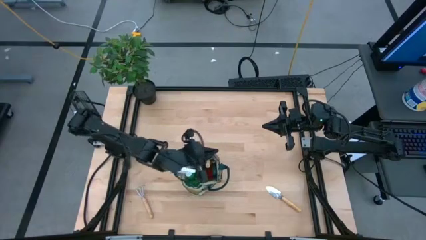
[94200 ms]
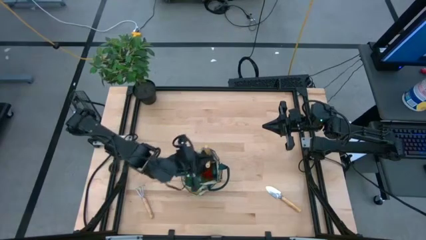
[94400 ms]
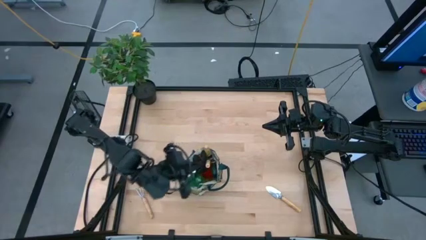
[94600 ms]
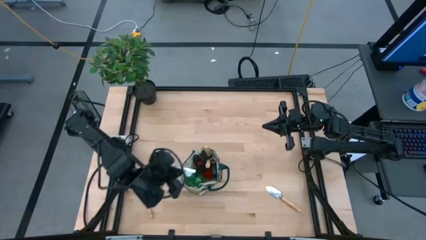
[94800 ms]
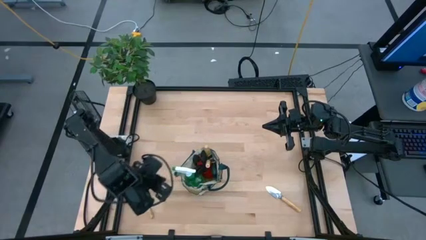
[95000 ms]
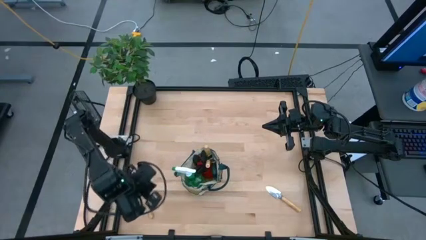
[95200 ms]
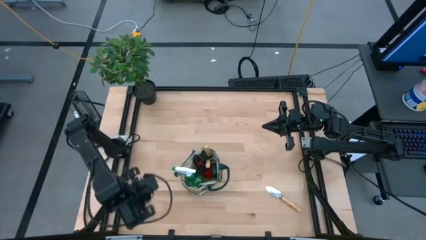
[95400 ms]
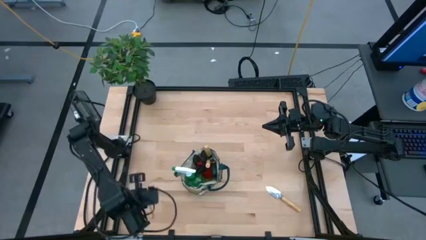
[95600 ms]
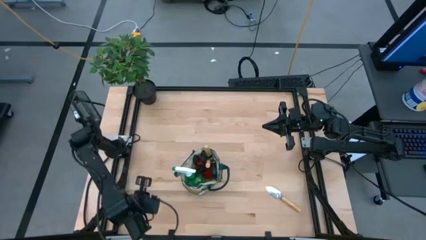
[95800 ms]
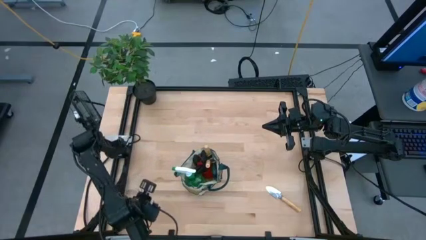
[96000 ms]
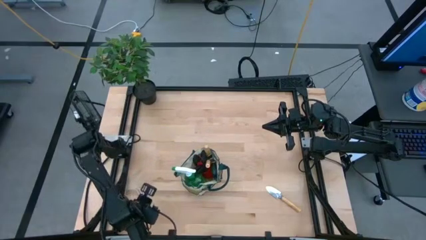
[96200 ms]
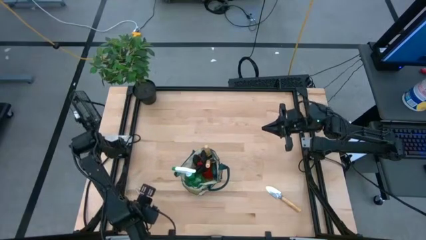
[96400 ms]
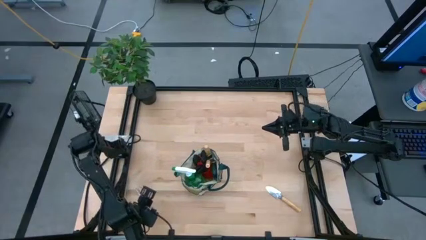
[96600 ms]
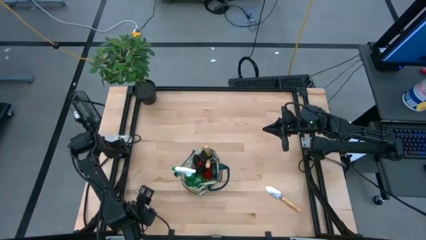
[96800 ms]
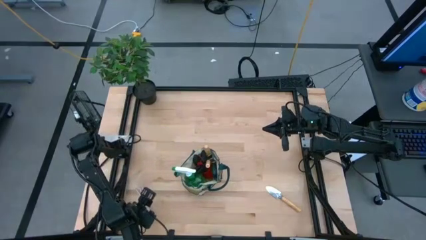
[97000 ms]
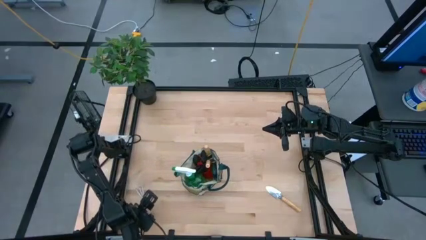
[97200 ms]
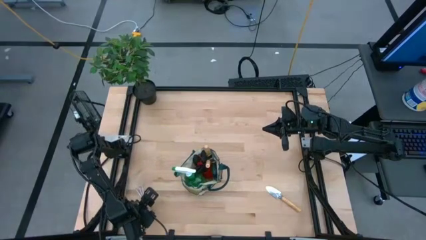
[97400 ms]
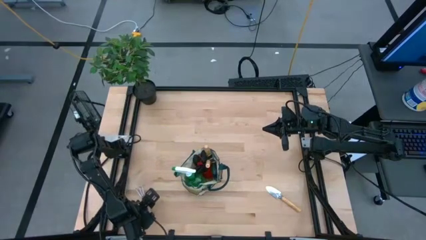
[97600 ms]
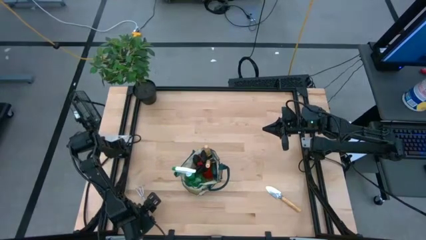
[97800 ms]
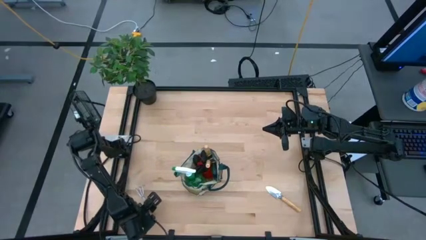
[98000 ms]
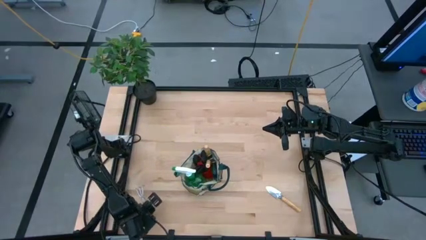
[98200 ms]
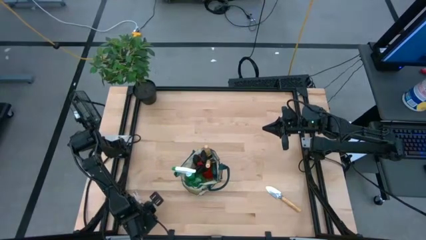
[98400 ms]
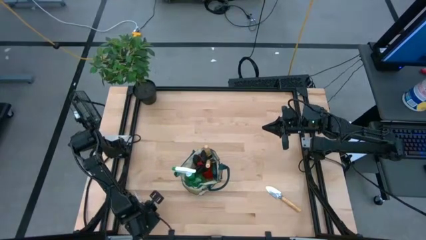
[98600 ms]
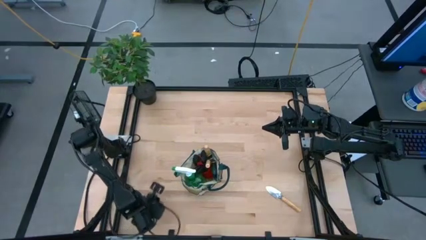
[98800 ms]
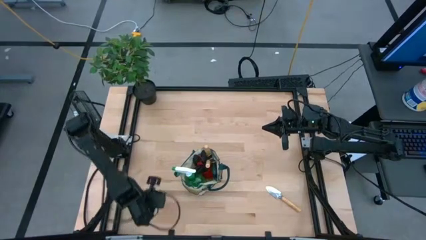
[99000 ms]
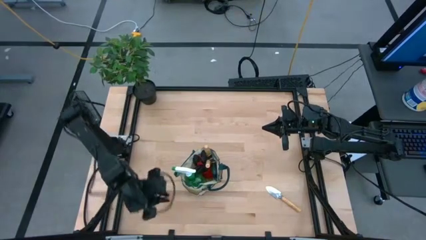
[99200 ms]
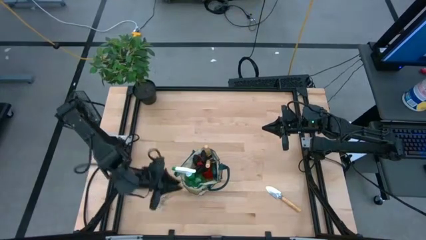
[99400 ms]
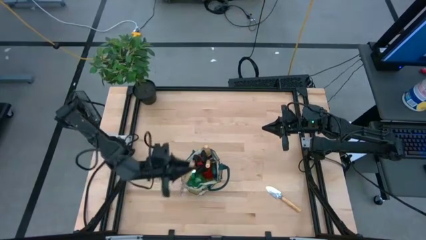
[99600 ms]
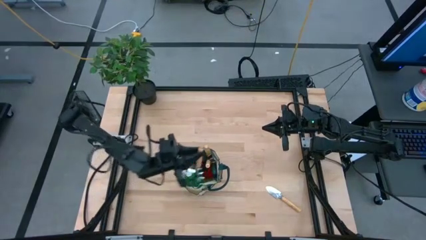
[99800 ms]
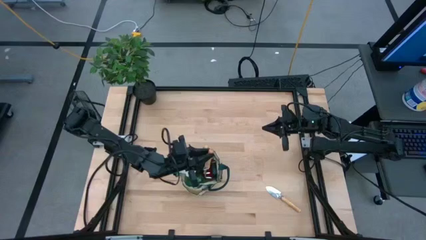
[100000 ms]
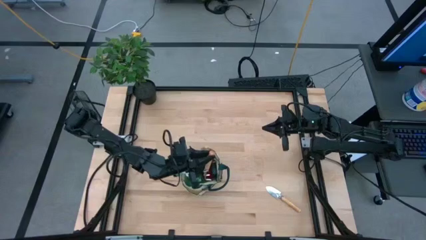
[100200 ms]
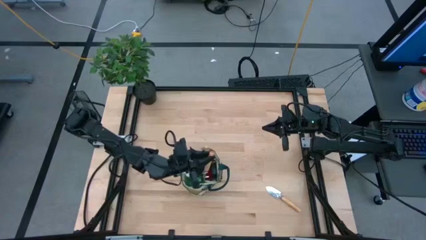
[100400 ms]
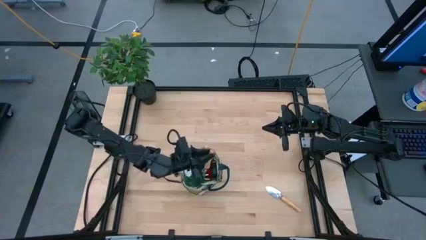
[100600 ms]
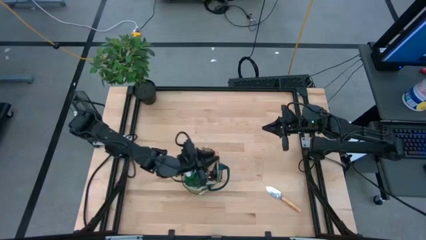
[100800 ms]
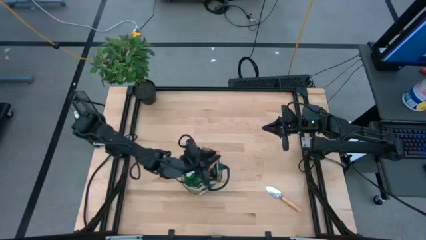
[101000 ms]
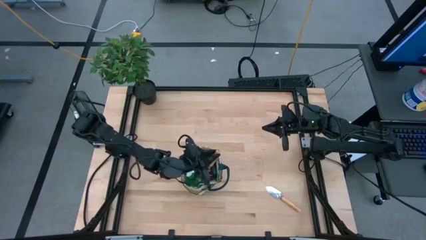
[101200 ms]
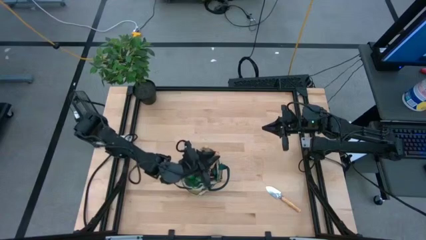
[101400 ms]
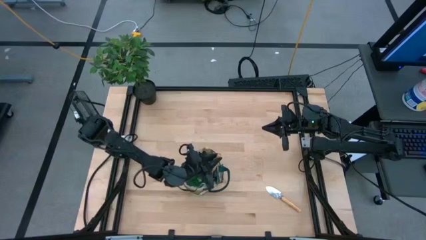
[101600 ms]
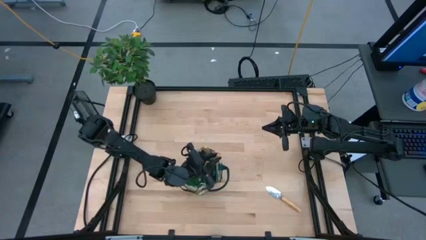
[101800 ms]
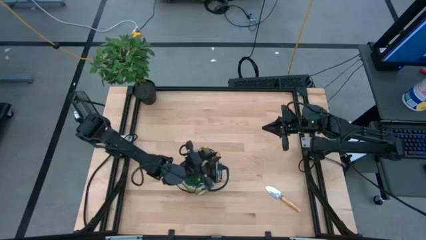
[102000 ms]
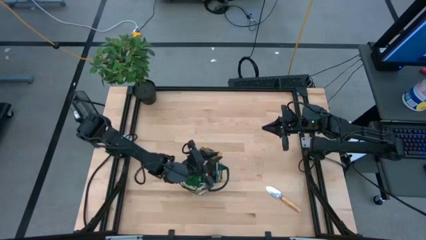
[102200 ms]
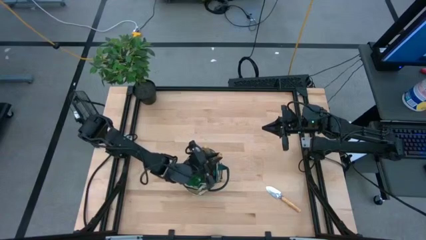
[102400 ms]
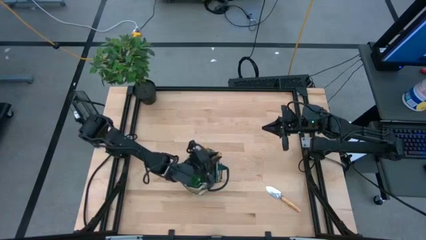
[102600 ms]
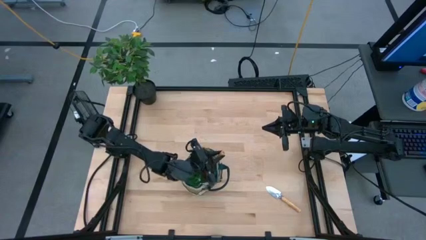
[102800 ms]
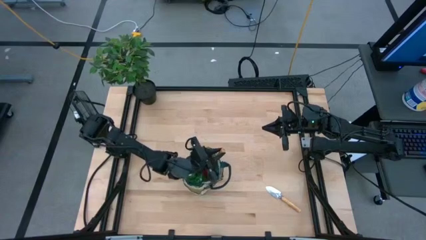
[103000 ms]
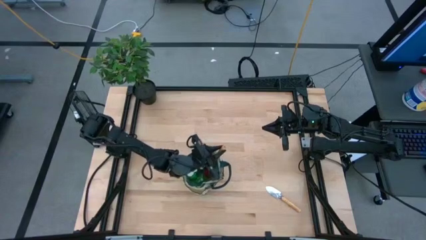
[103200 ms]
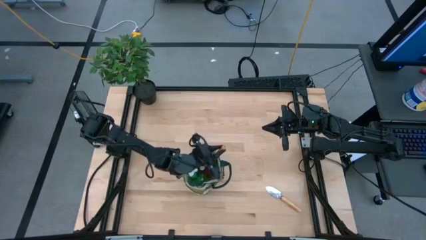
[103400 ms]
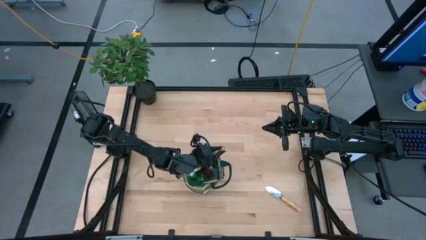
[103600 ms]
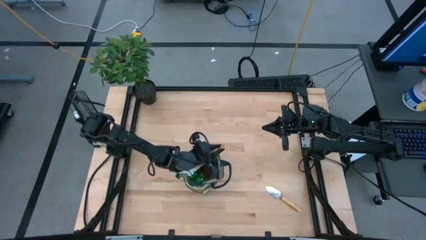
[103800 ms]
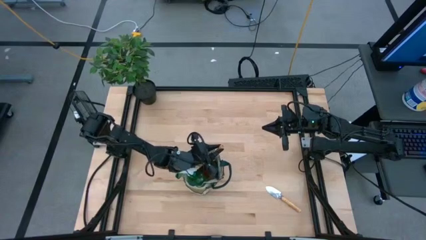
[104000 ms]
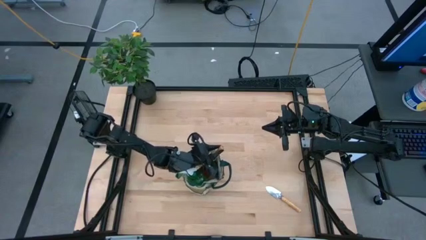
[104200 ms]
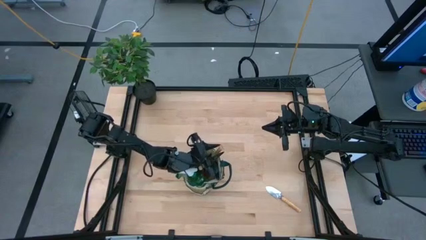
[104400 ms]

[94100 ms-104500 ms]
Task: Pick & Place Garden tools in Gardening bag
Put the hand rake into the gardening bag

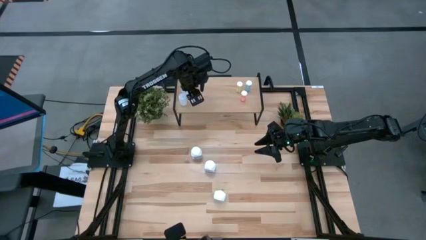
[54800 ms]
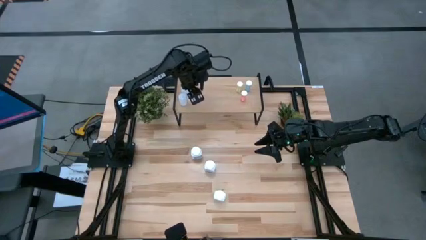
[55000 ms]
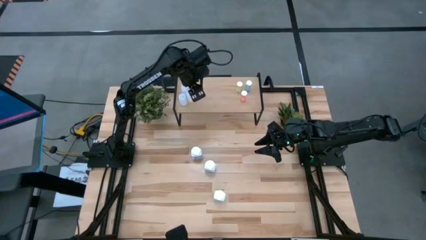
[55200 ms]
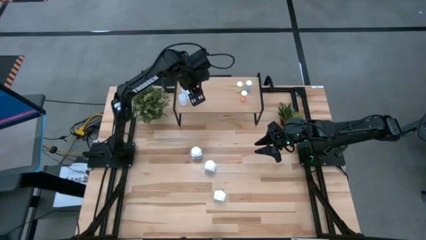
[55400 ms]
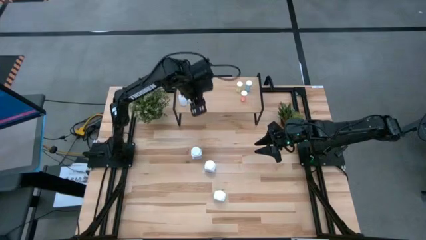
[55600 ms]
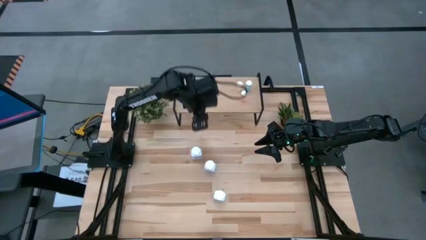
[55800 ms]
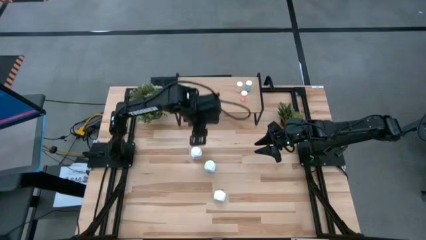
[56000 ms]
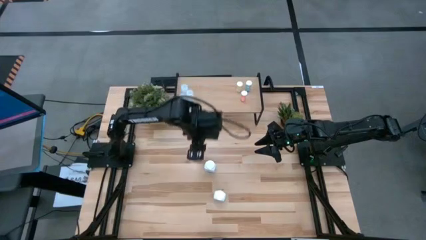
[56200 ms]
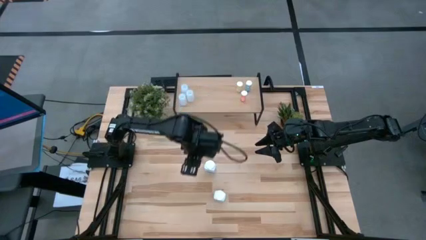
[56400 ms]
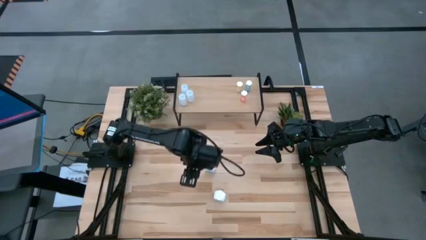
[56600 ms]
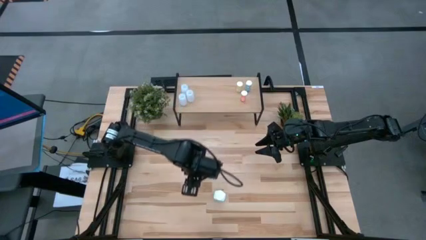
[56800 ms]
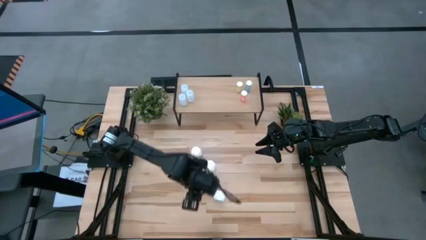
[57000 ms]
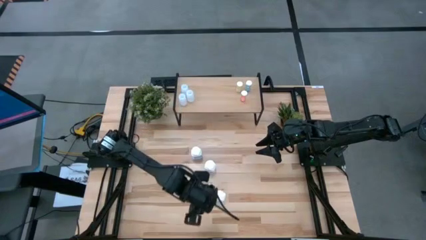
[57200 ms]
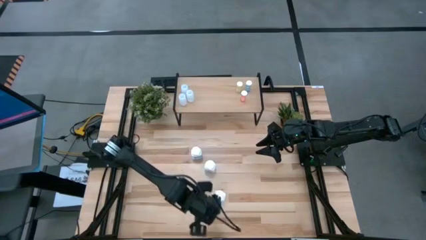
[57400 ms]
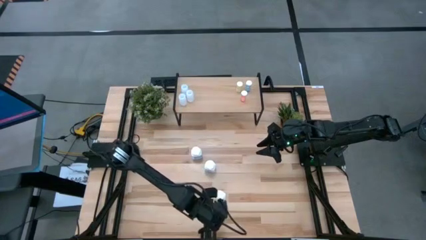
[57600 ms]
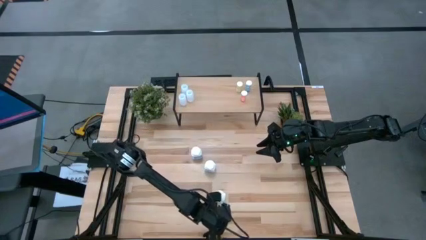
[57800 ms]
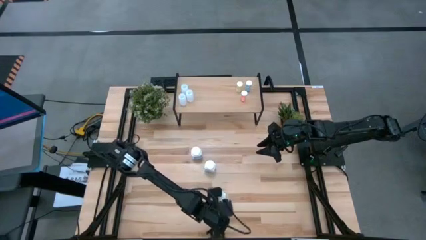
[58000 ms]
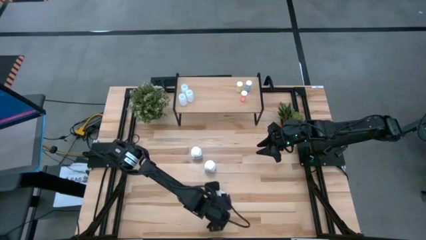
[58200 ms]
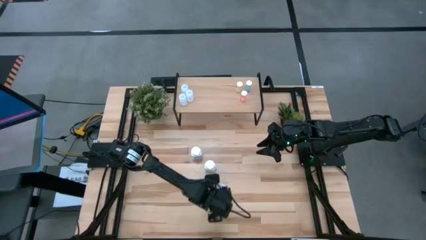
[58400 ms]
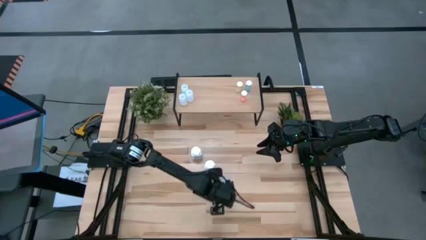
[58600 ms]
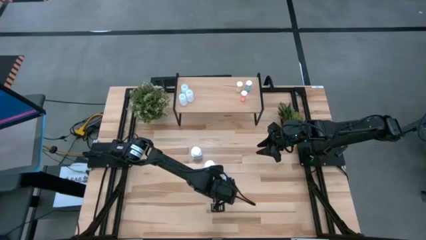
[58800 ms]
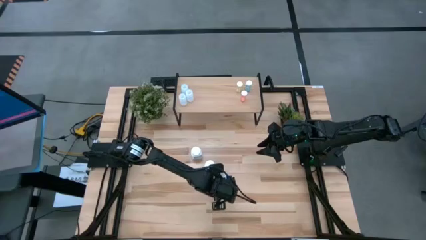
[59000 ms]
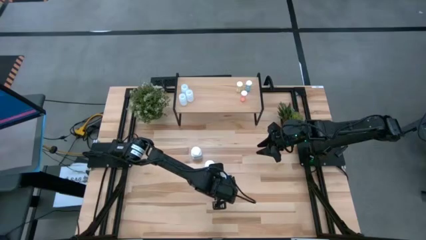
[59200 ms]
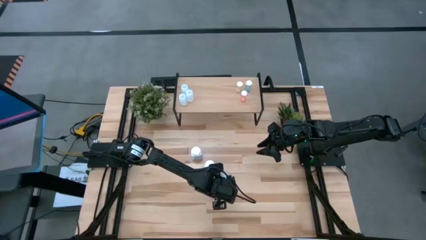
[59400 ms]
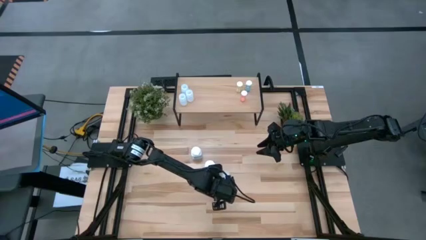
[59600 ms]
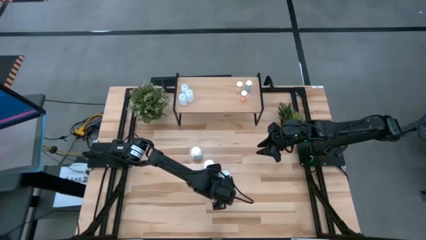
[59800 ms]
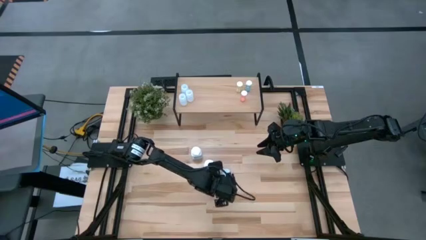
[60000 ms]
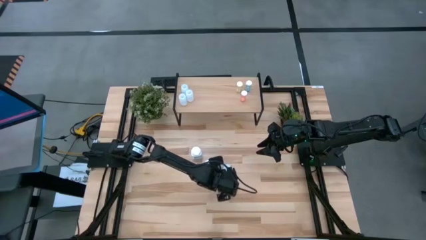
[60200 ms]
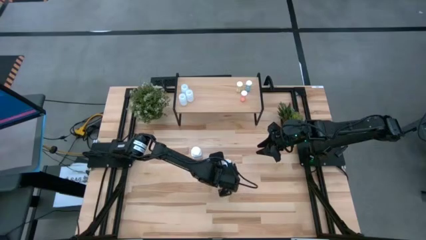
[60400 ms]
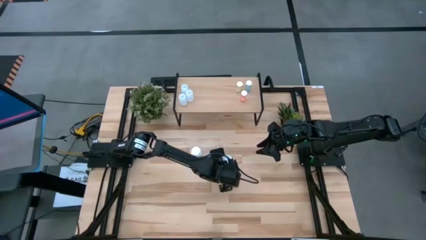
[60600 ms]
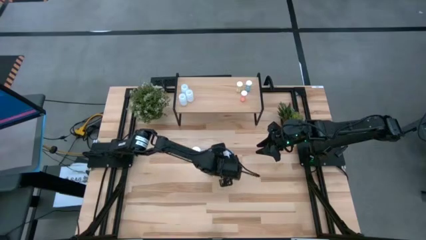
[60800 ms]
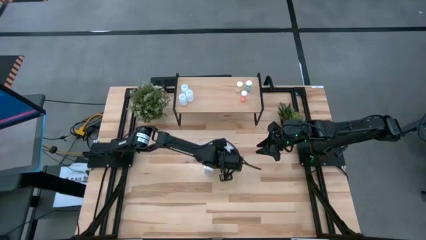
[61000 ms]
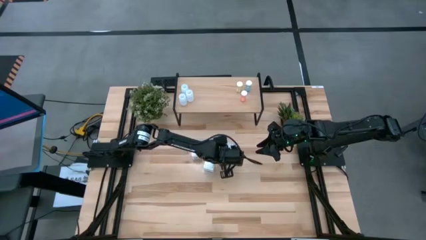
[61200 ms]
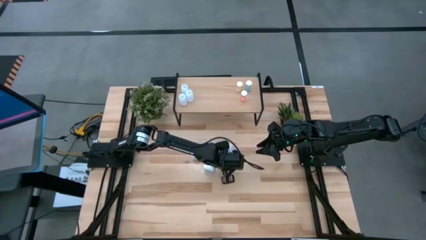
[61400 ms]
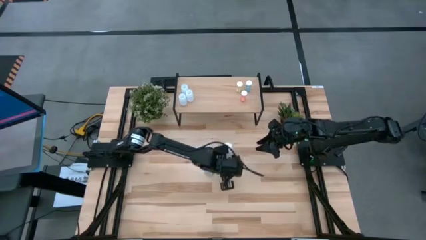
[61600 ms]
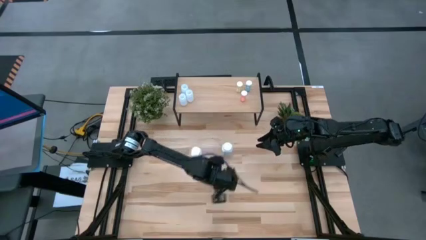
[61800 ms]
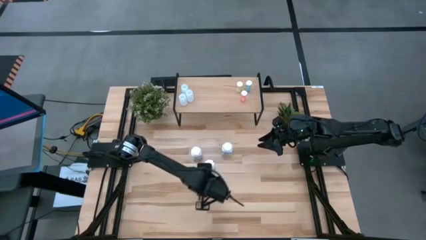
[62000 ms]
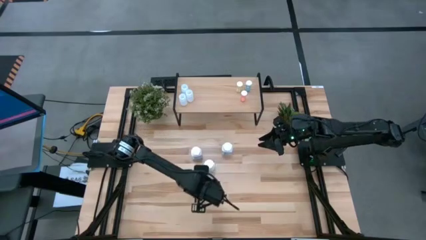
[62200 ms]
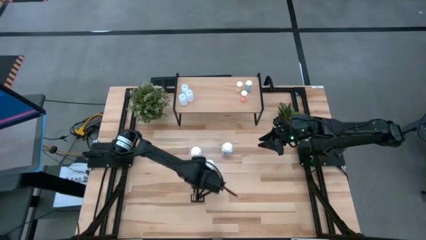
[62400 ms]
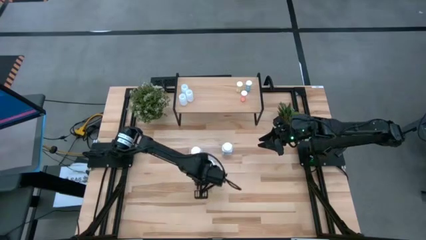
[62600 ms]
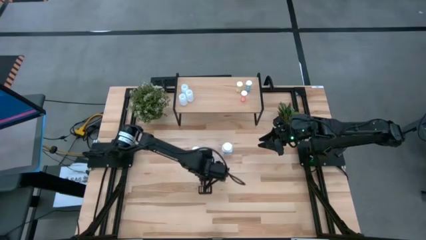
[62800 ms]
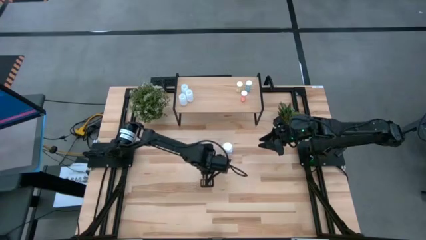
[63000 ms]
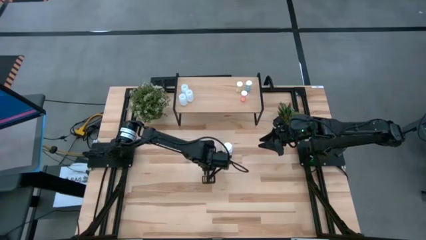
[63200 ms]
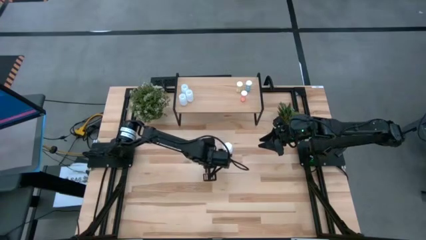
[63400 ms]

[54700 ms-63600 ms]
Task: Pick and place medicine bottles onto shelf by color
Move the bottom white blue pill bottle to the middle of the table
